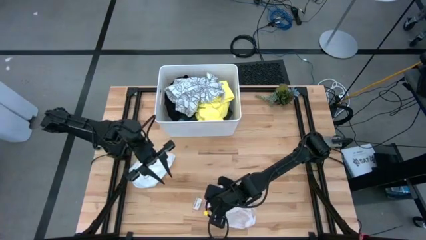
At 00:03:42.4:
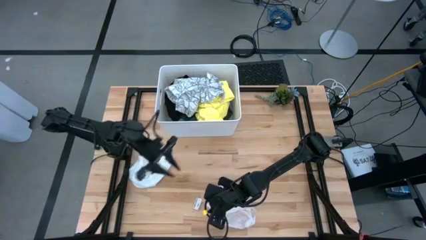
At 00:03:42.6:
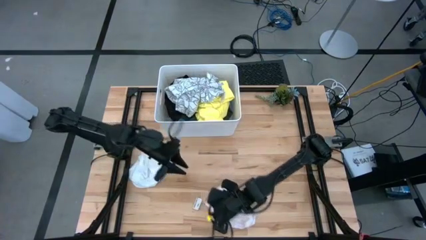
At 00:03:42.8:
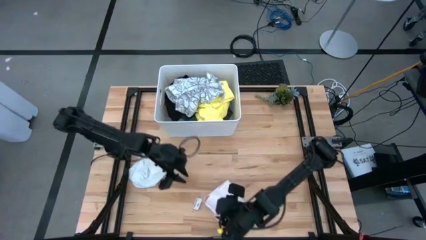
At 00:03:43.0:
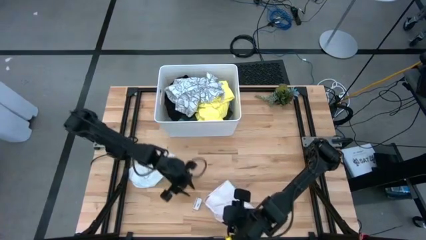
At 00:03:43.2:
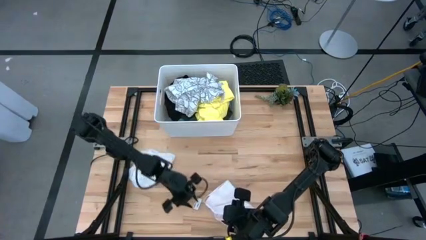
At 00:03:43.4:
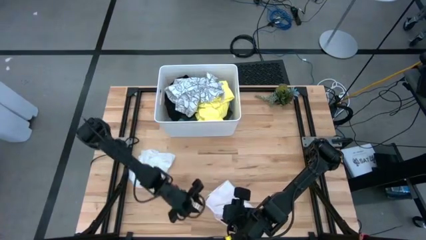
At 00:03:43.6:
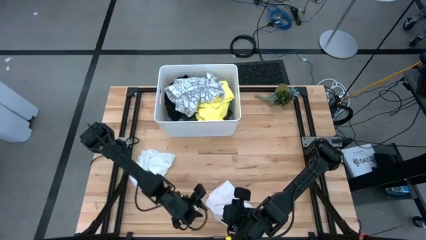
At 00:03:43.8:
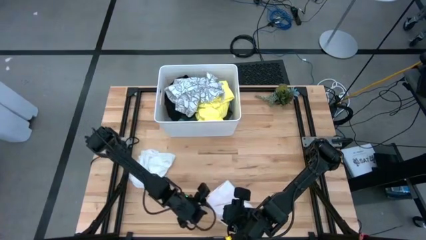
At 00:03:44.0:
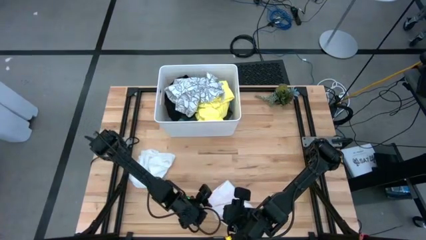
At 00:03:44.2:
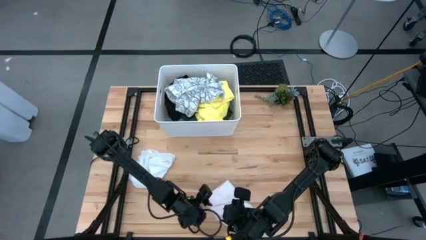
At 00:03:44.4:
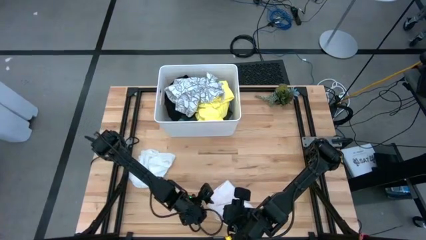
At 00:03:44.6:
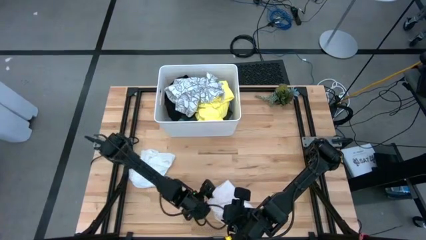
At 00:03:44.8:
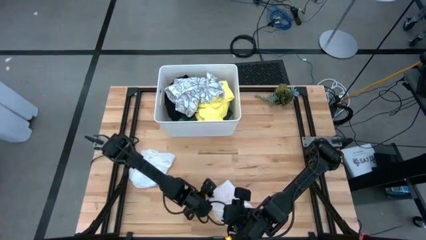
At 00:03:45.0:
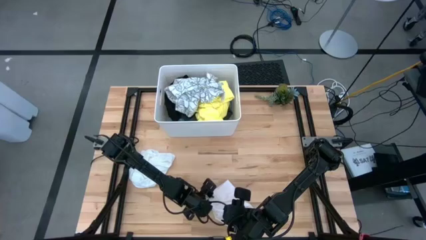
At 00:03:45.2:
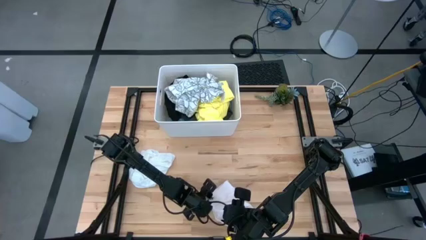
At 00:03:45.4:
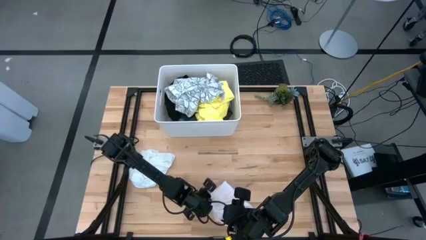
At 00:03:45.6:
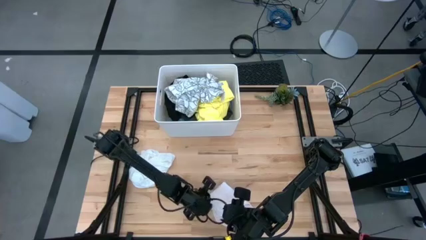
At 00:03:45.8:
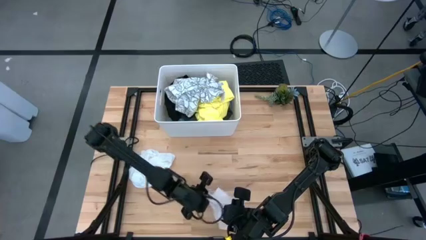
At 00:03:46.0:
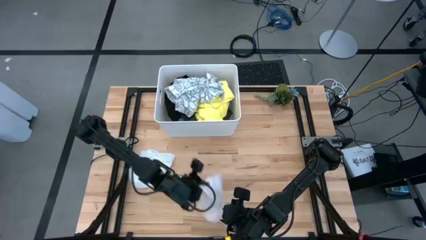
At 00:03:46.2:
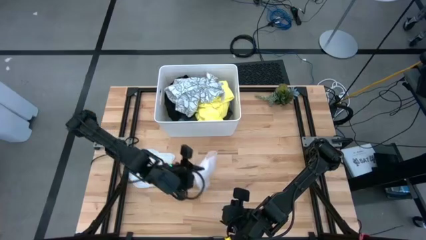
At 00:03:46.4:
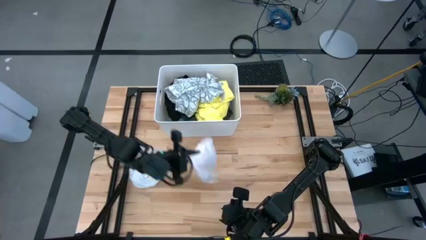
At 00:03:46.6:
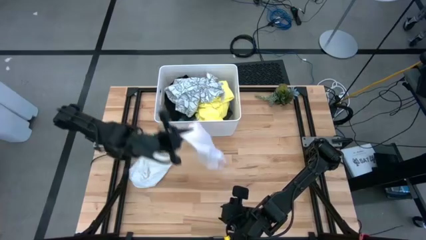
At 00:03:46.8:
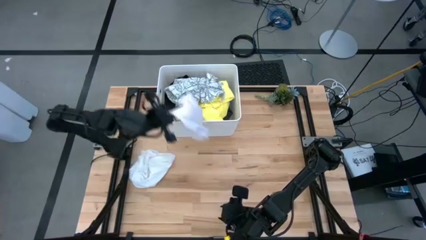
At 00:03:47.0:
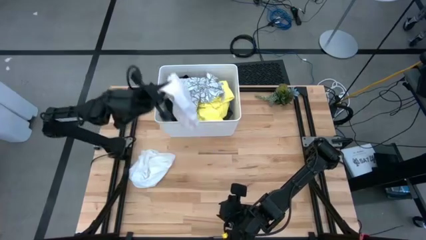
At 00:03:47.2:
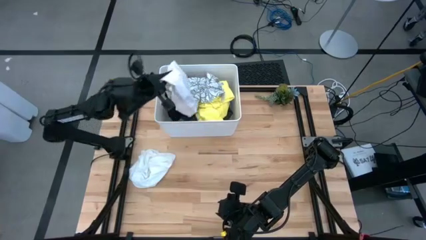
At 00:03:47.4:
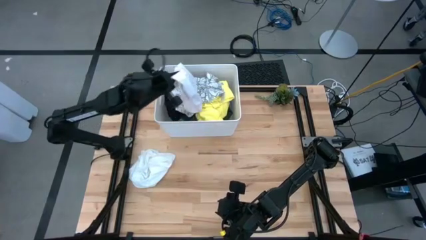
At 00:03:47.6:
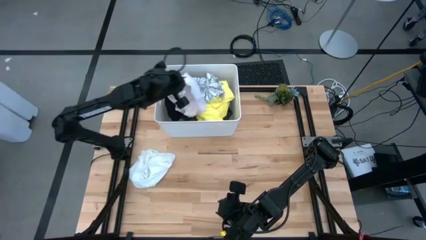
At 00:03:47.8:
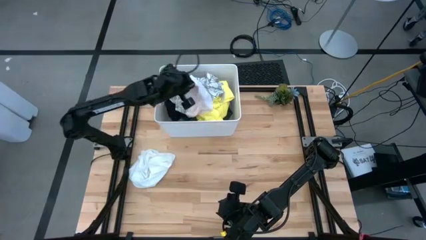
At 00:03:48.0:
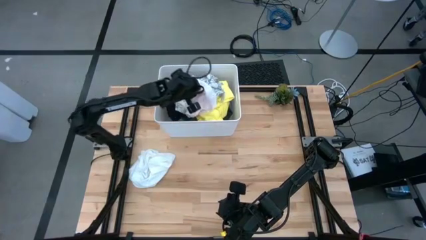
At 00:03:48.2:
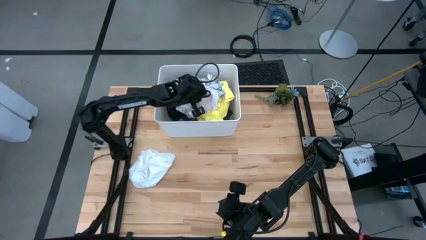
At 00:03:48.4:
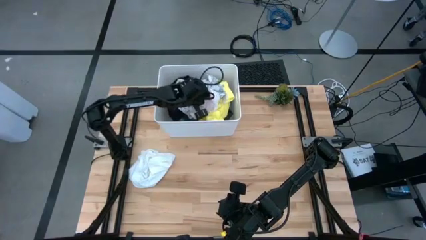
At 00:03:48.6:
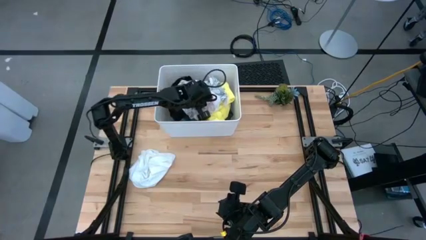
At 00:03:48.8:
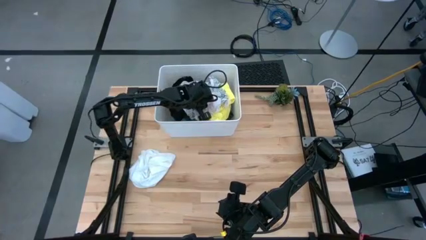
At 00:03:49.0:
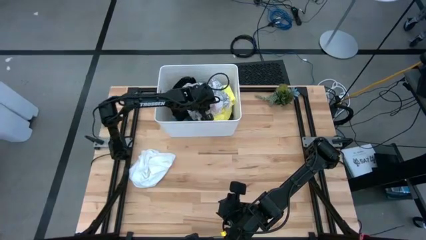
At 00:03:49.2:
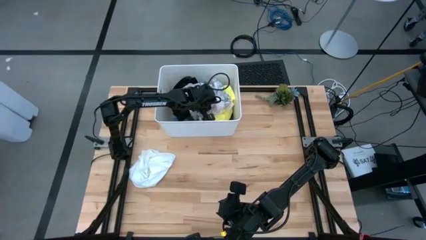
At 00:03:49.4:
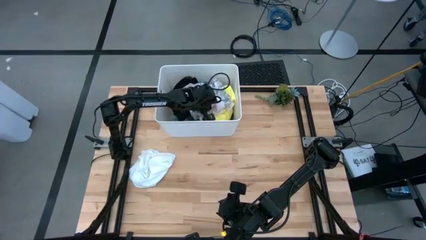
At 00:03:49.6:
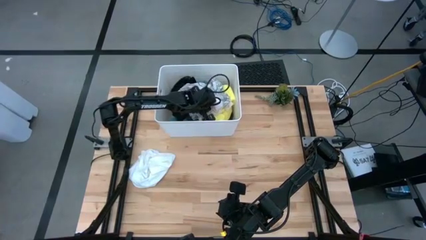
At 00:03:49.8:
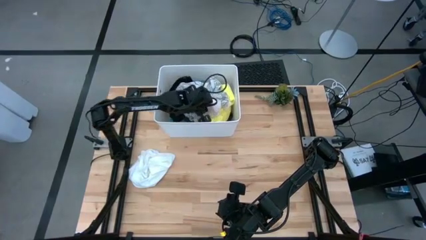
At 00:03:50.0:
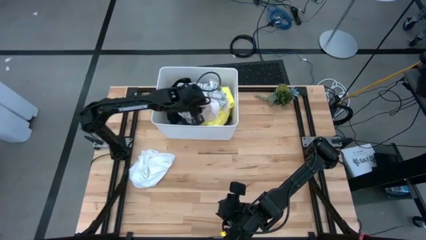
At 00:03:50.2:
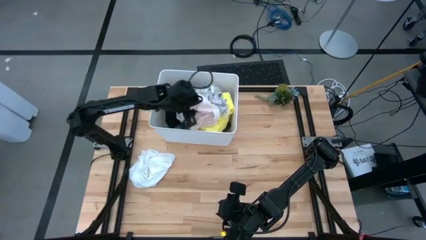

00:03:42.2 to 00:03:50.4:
Task: Fold laundry
Put the folded pink underwear into the white laundry bin

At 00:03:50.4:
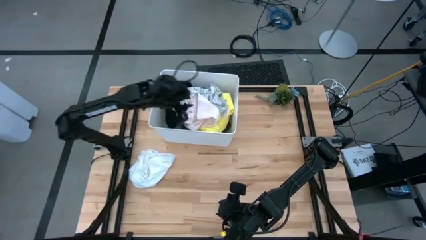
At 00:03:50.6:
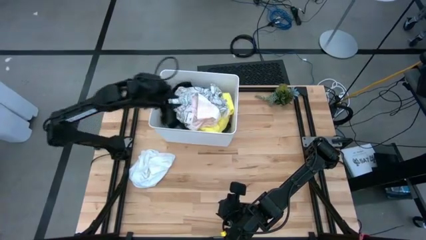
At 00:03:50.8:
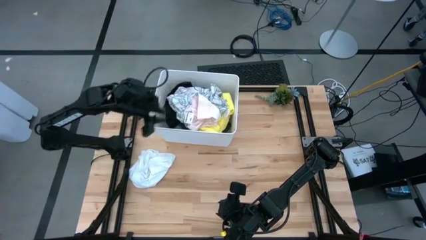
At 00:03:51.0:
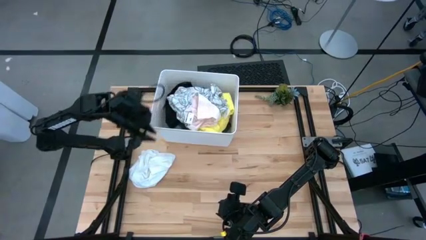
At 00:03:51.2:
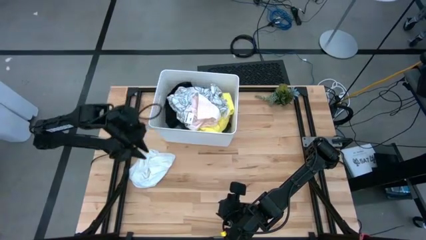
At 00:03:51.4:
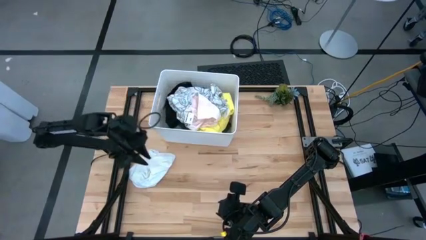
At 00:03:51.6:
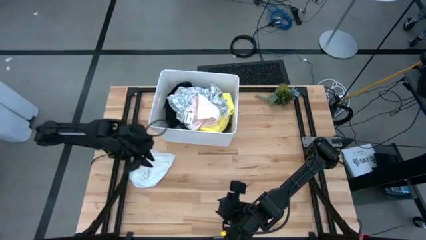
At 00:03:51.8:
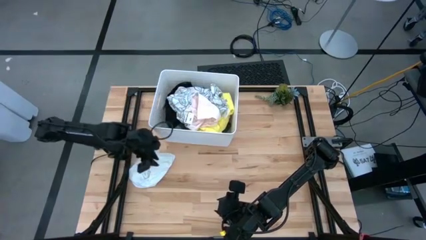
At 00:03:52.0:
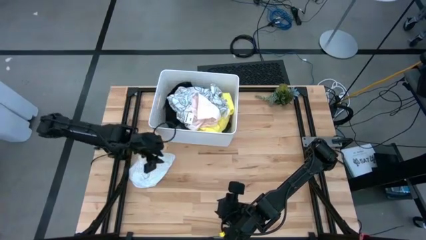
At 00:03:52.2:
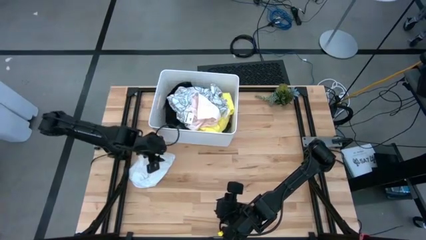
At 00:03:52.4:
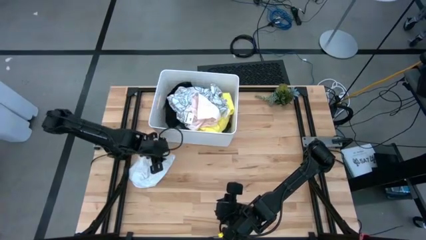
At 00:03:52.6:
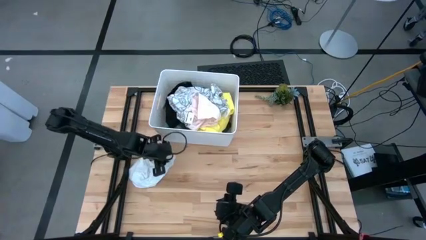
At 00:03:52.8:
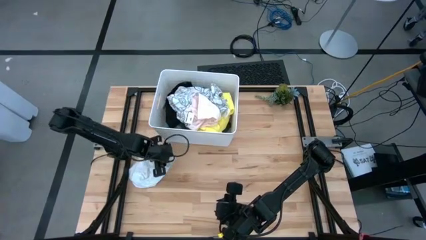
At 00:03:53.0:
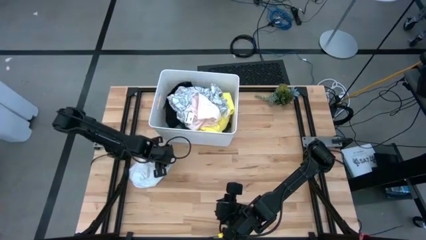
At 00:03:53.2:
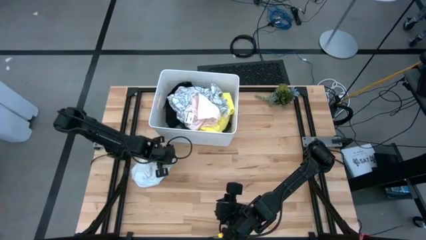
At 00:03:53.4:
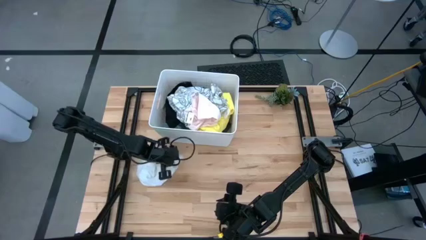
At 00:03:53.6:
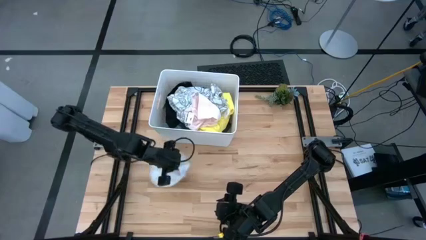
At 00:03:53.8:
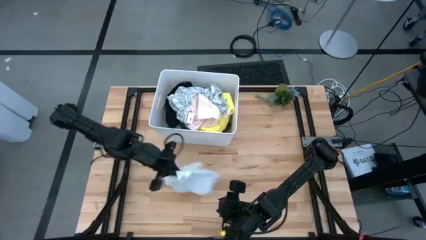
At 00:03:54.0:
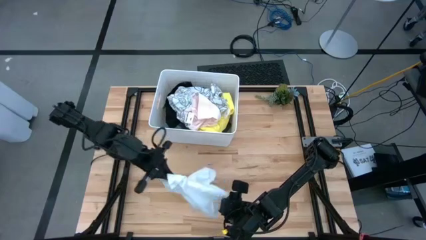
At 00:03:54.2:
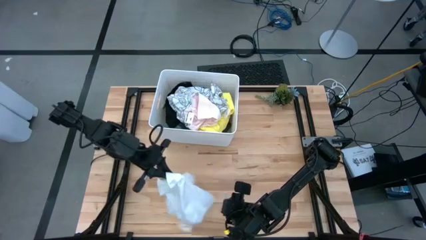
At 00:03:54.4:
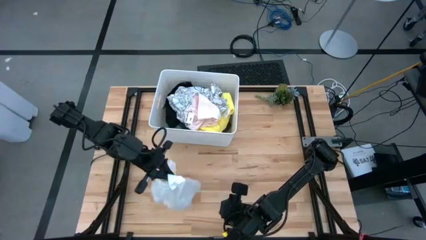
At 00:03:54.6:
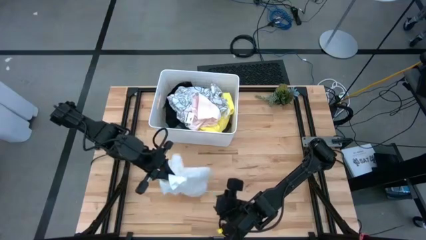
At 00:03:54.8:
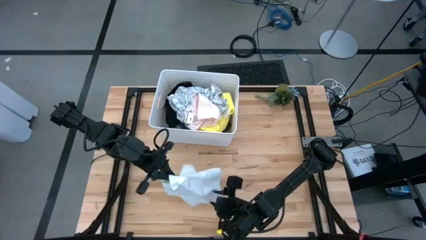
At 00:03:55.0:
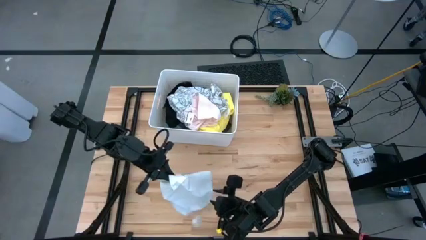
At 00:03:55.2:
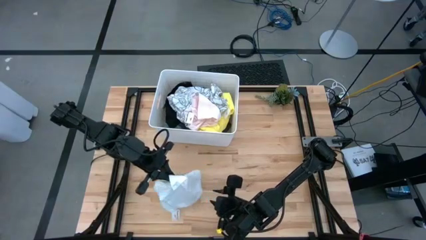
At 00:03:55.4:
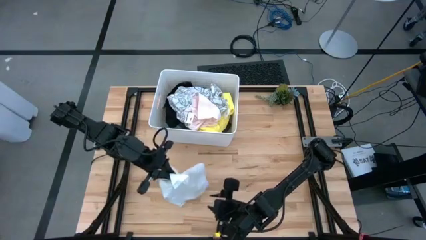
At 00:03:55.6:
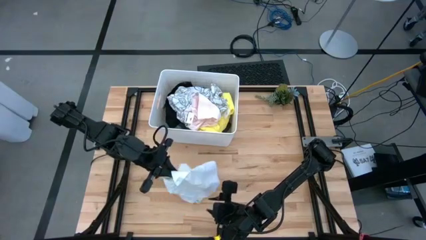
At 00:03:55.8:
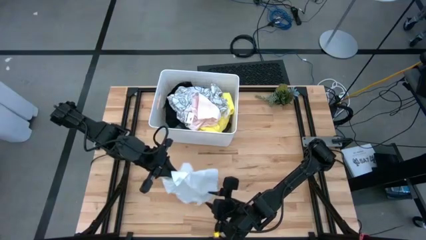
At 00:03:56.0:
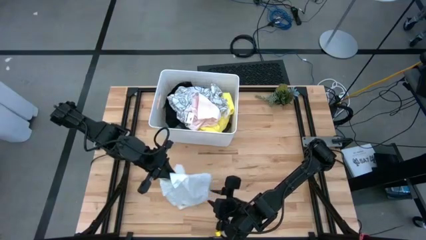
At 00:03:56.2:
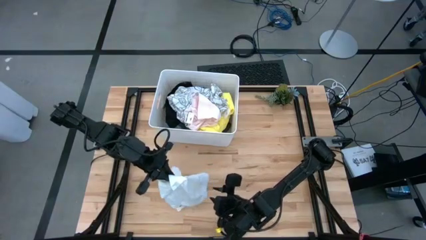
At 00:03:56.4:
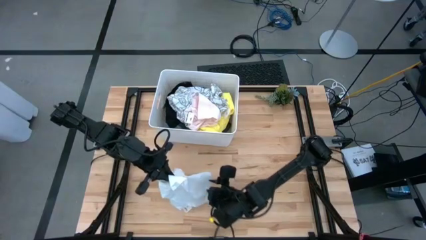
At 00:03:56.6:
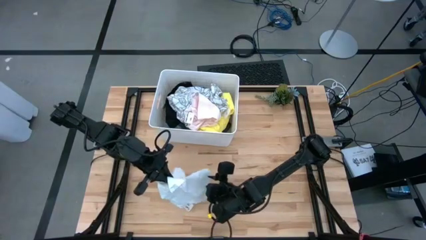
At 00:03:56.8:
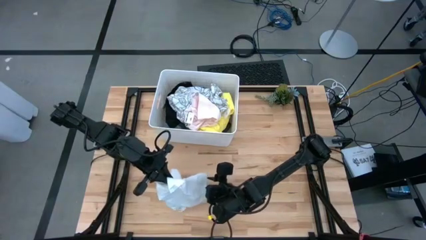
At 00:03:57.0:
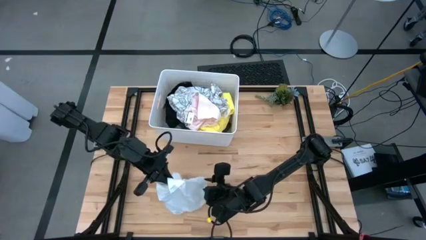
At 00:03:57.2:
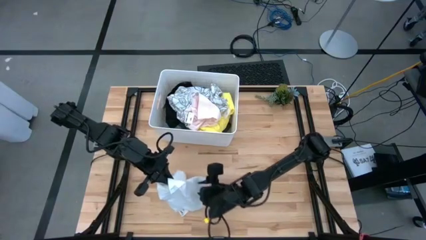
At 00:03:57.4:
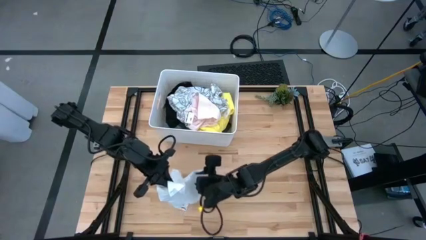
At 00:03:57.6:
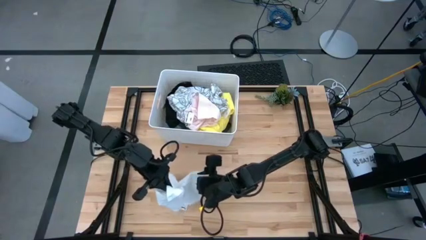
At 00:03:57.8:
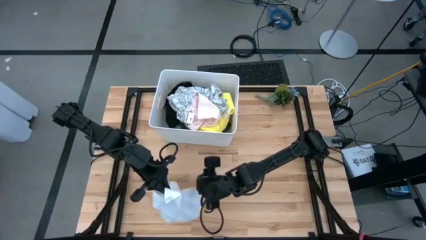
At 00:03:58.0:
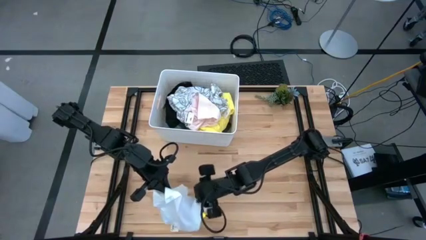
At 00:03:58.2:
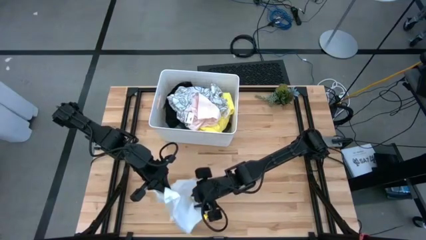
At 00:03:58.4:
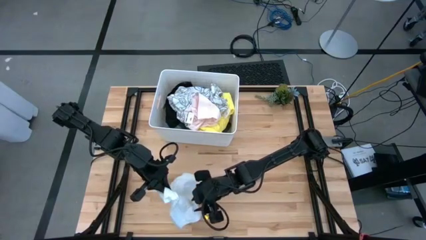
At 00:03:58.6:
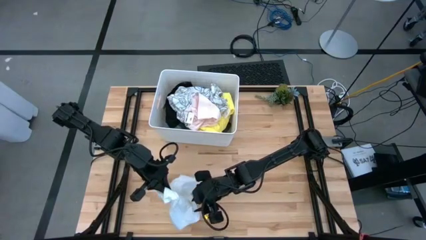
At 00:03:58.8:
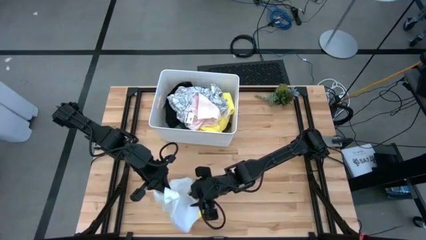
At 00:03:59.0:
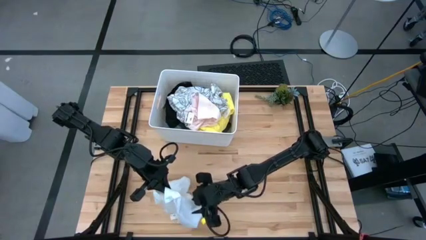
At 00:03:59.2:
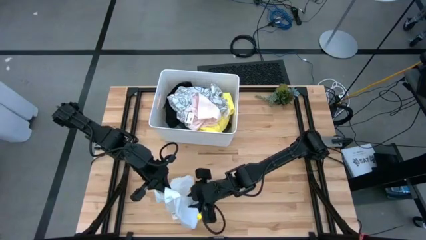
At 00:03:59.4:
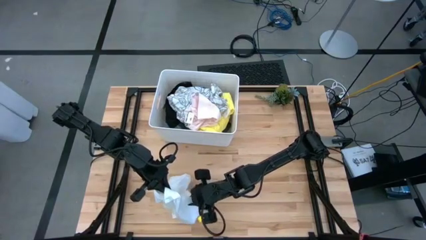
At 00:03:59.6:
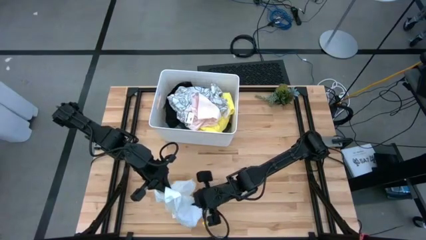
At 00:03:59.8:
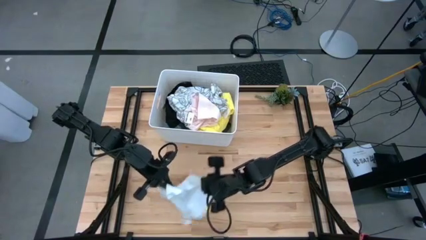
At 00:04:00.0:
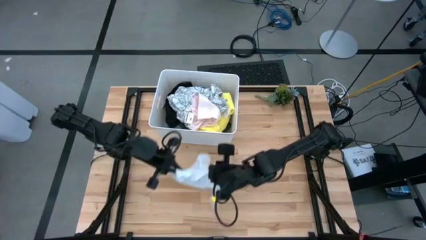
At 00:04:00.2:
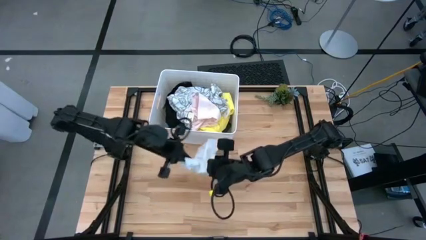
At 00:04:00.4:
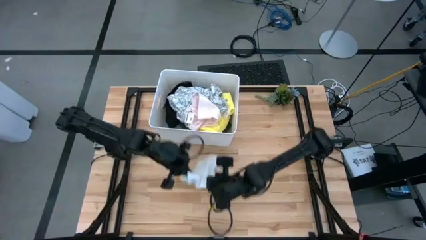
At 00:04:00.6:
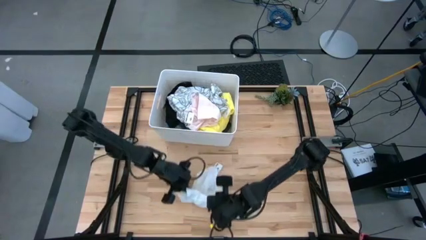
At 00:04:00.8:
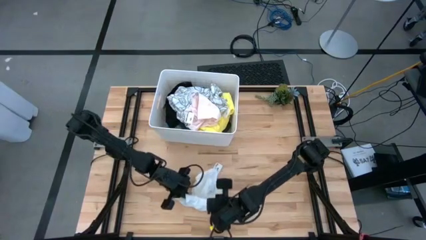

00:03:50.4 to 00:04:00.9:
Put the white underwear into the white laundry bin
